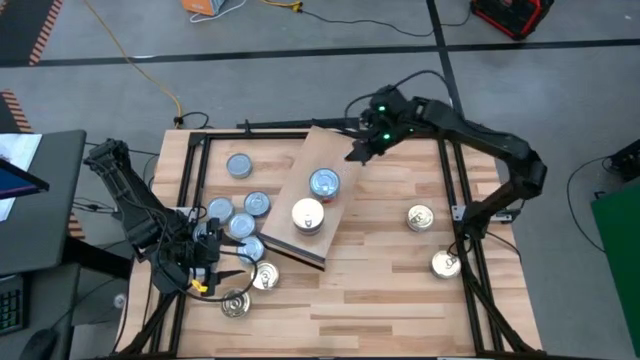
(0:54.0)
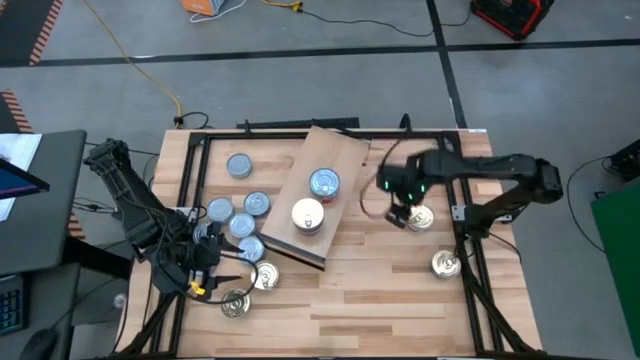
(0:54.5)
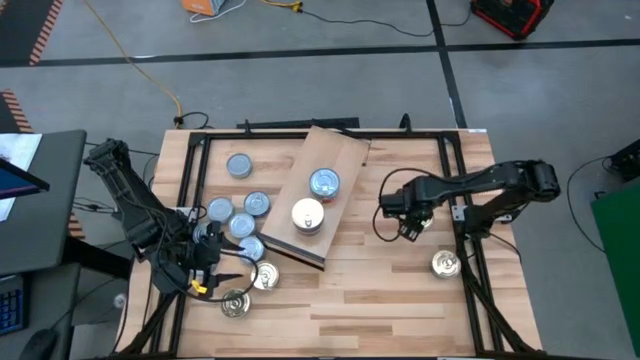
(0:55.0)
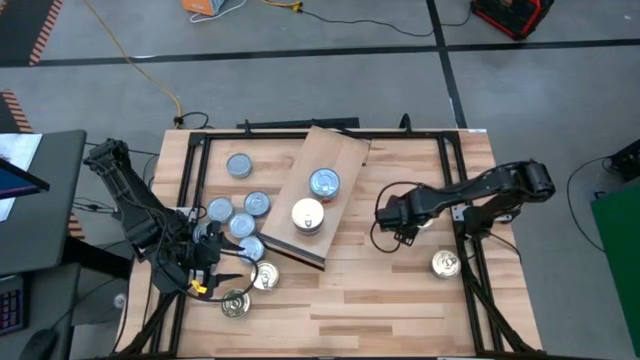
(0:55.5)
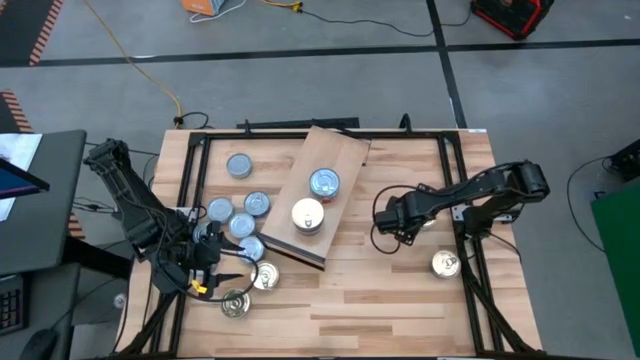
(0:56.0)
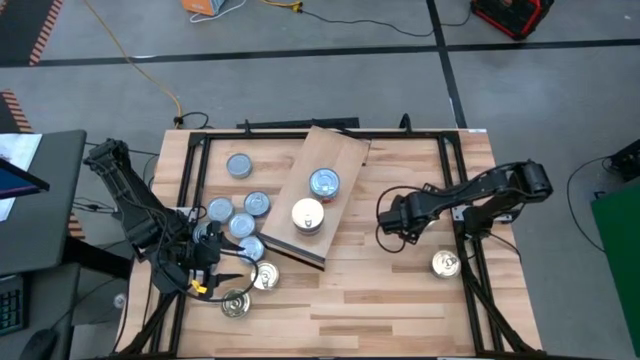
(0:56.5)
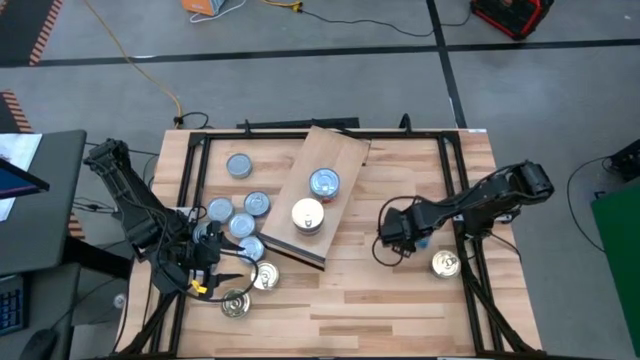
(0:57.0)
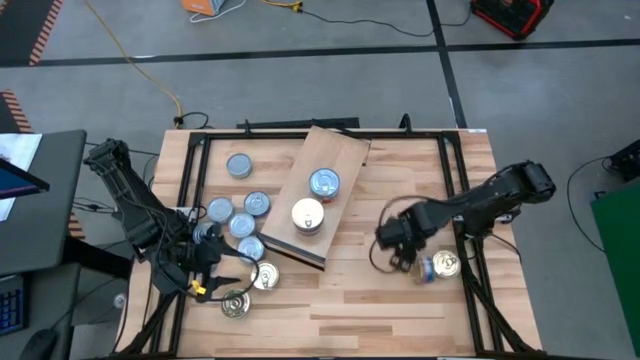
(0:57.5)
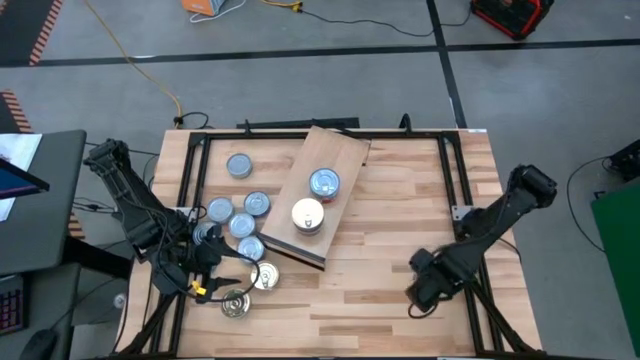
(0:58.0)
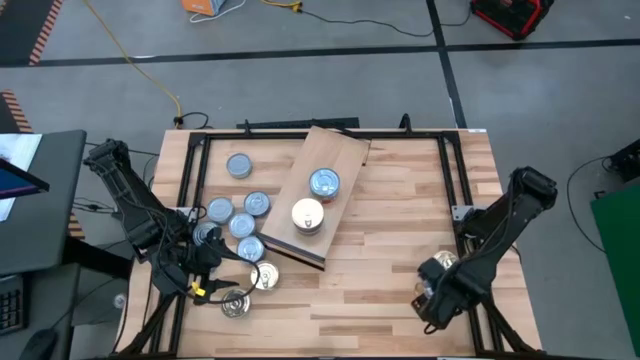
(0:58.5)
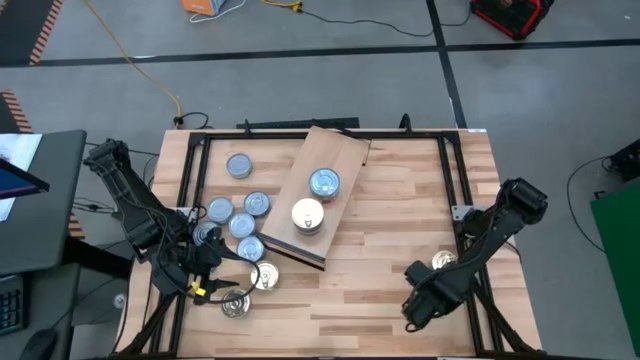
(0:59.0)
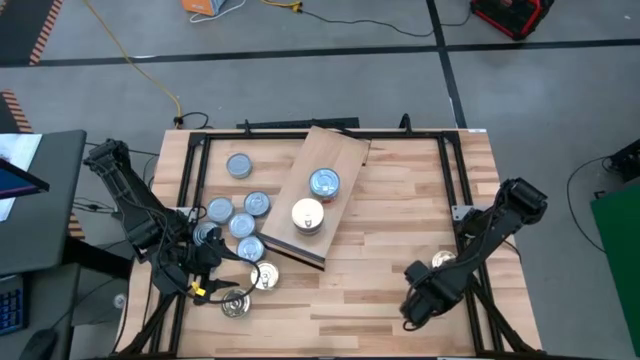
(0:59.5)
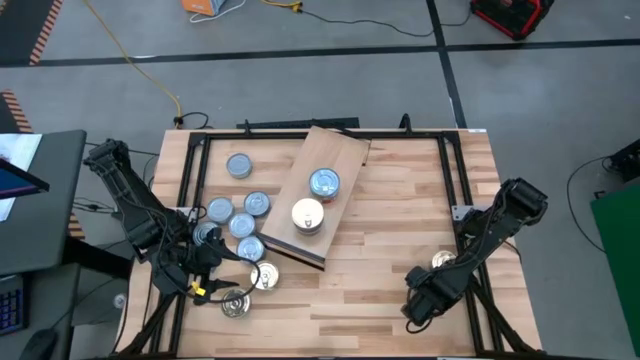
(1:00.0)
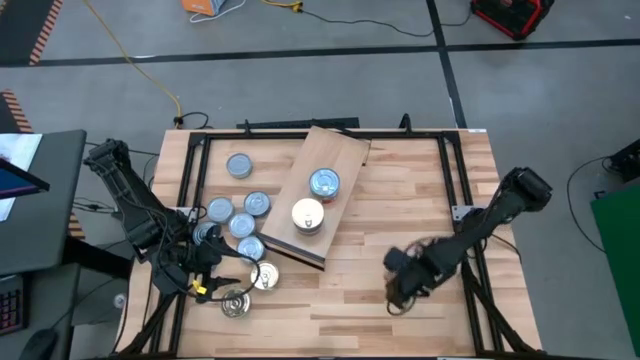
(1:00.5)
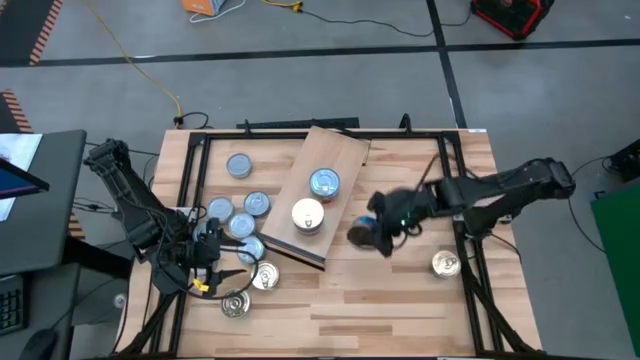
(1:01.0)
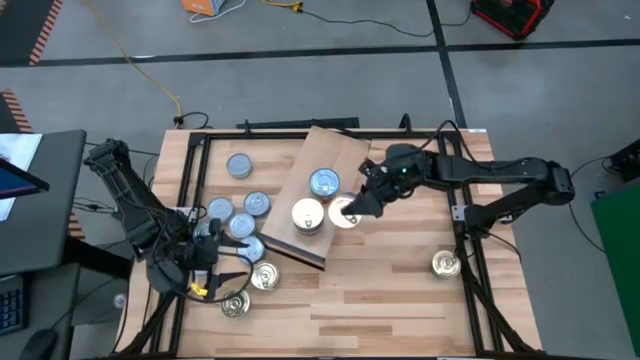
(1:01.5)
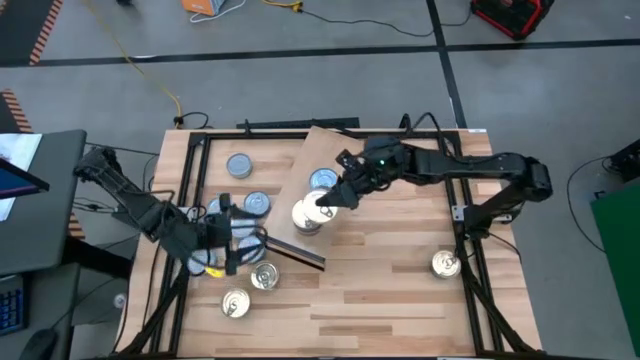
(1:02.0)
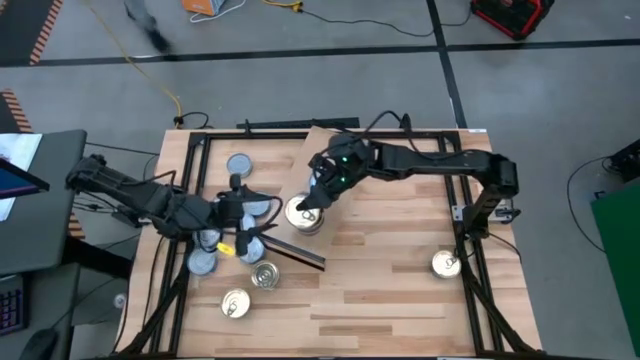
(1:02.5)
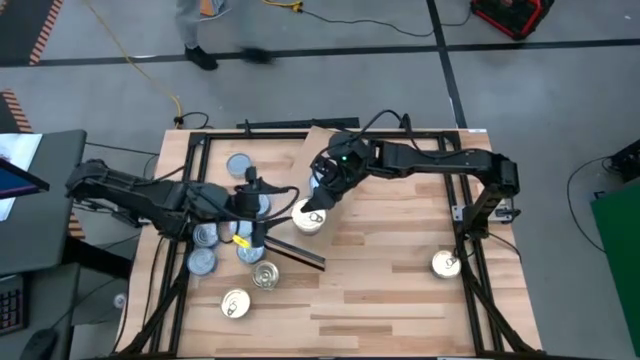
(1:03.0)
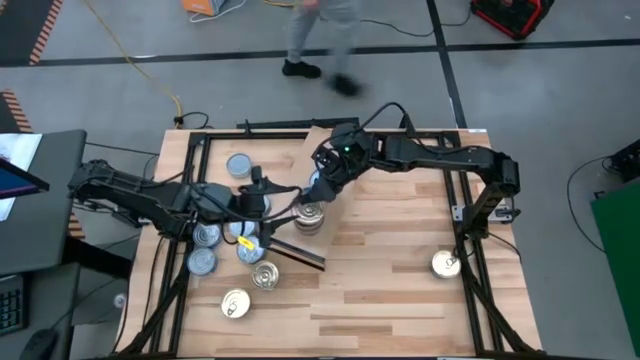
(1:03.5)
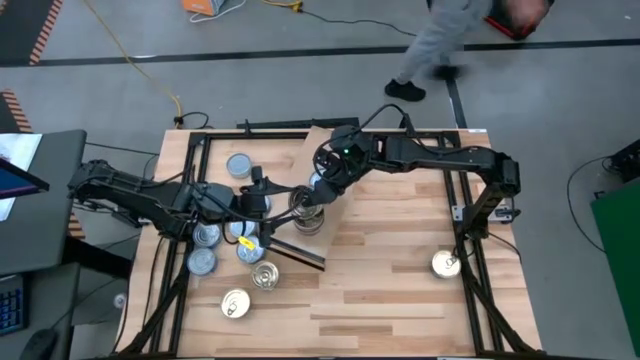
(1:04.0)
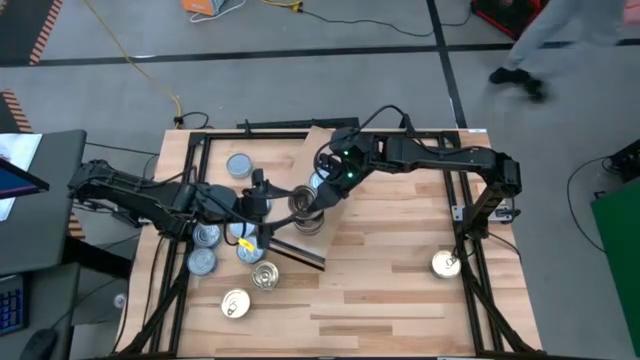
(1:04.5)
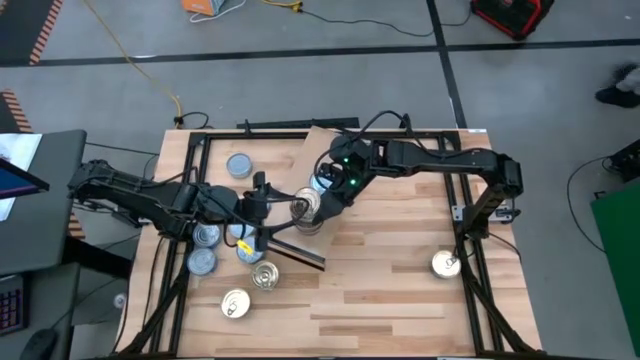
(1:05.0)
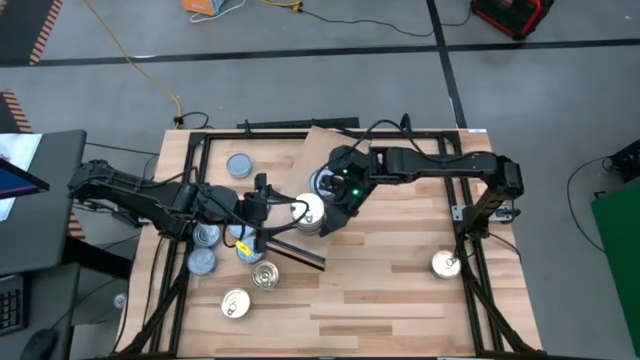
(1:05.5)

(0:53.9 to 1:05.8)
Task: Stack canned seafood by type on shelf
Stack the blue pink tuna can on top of the blue pink tuna can on the shelf

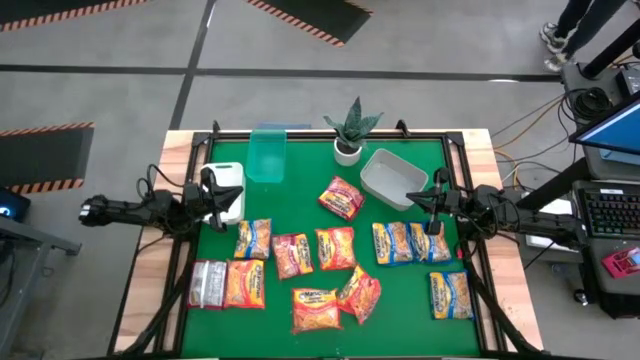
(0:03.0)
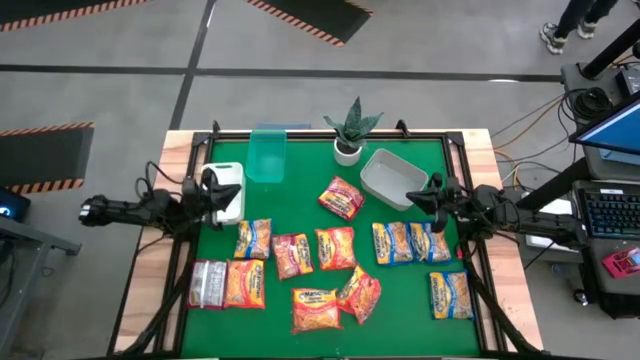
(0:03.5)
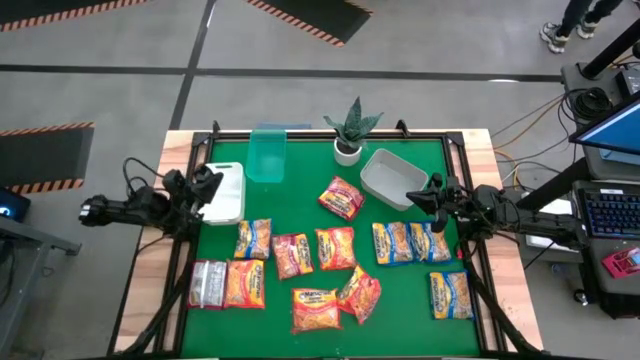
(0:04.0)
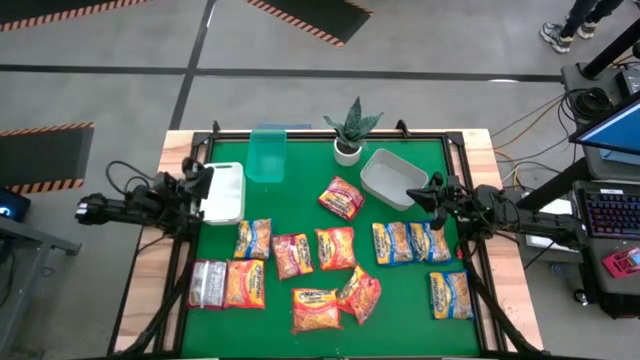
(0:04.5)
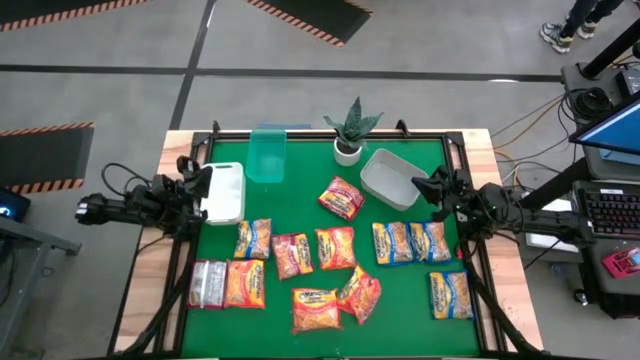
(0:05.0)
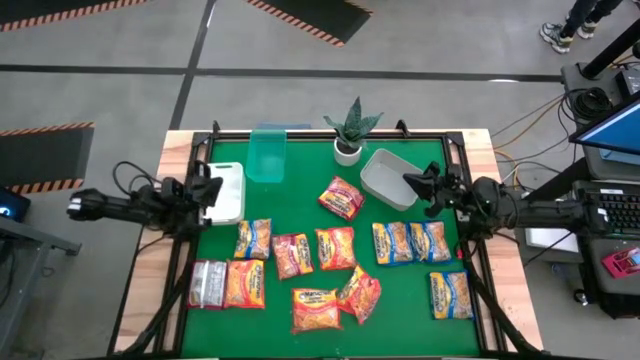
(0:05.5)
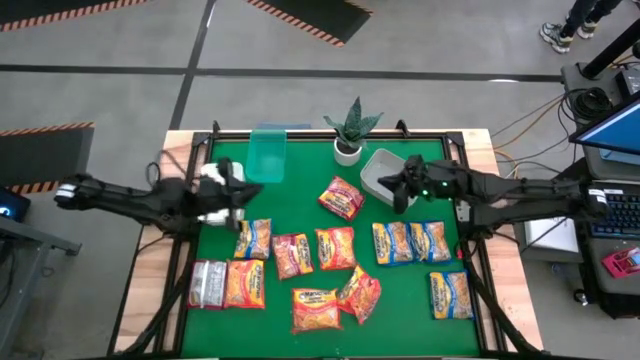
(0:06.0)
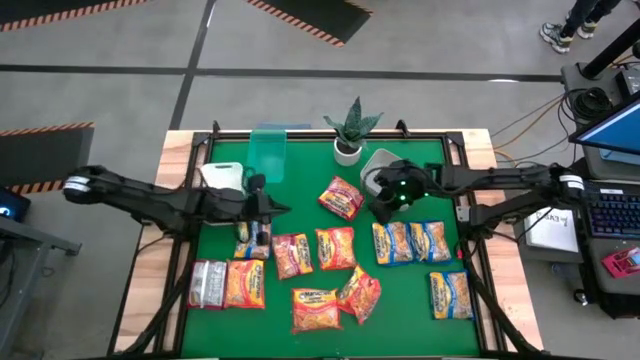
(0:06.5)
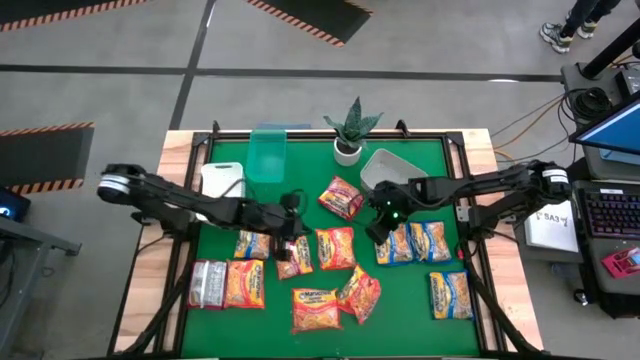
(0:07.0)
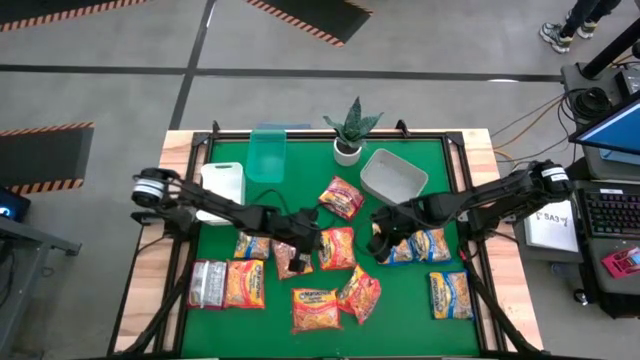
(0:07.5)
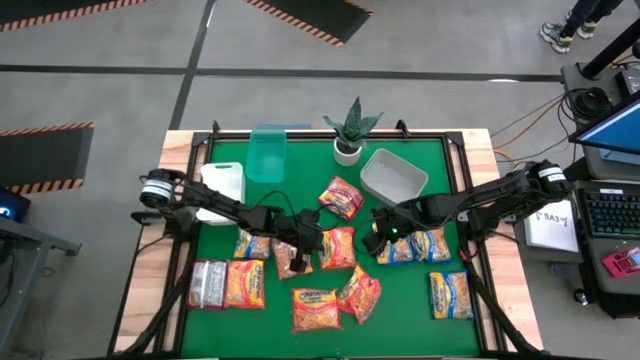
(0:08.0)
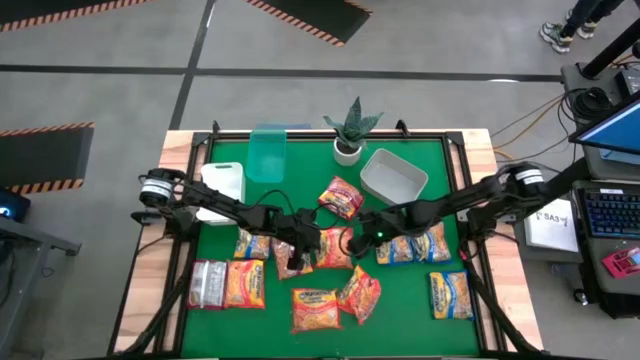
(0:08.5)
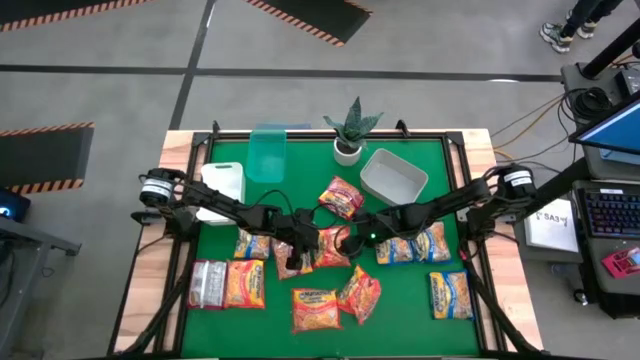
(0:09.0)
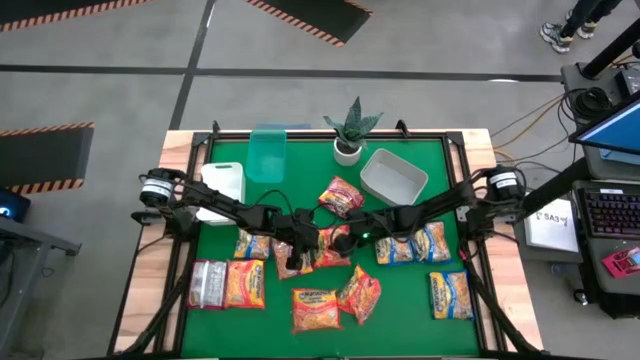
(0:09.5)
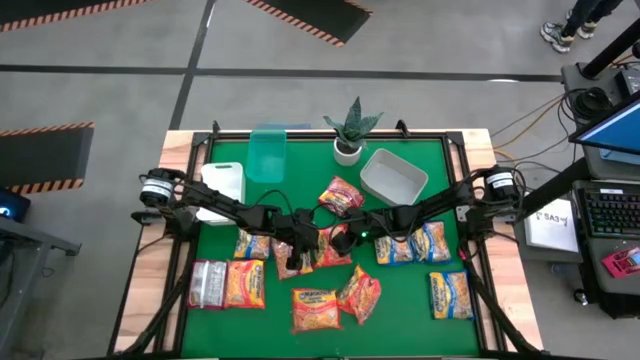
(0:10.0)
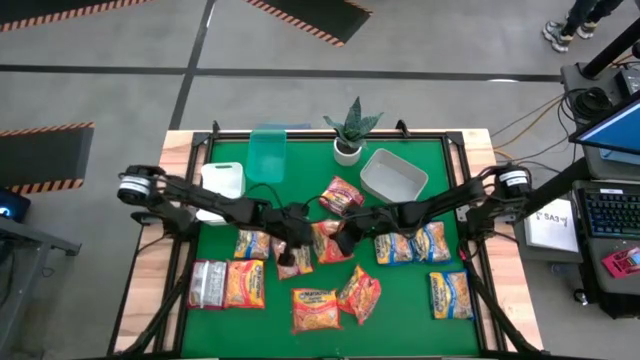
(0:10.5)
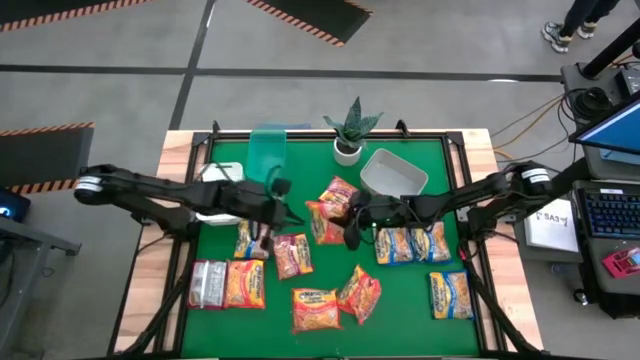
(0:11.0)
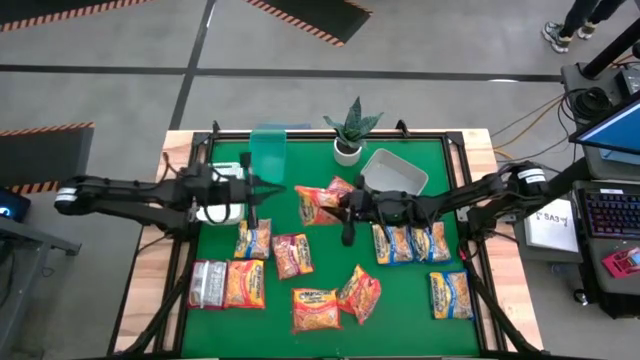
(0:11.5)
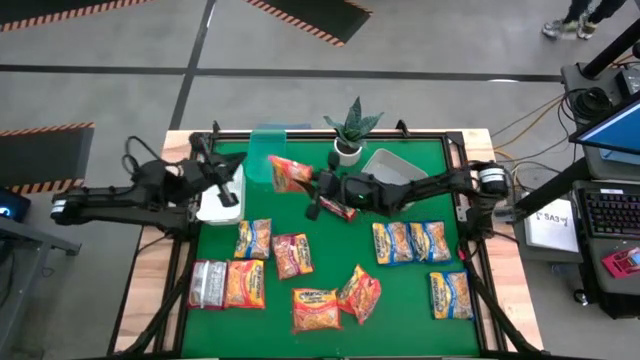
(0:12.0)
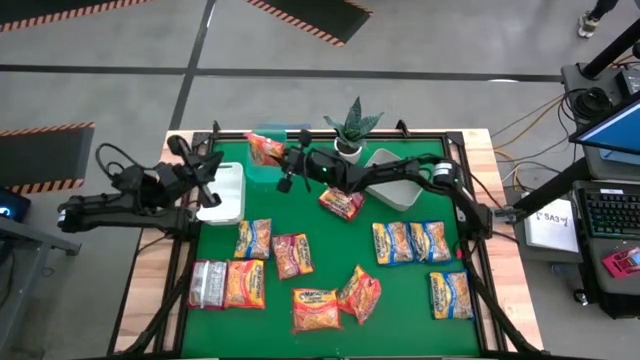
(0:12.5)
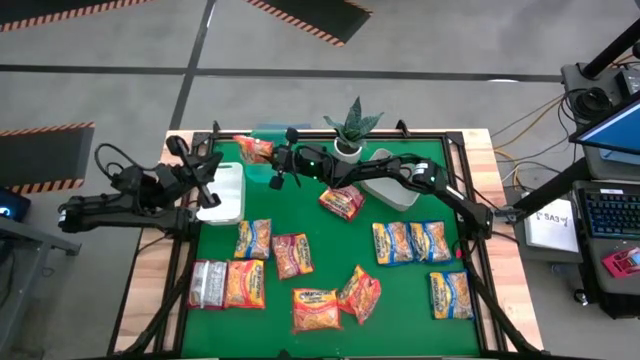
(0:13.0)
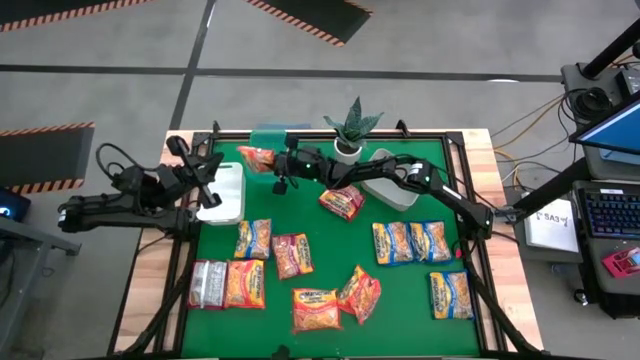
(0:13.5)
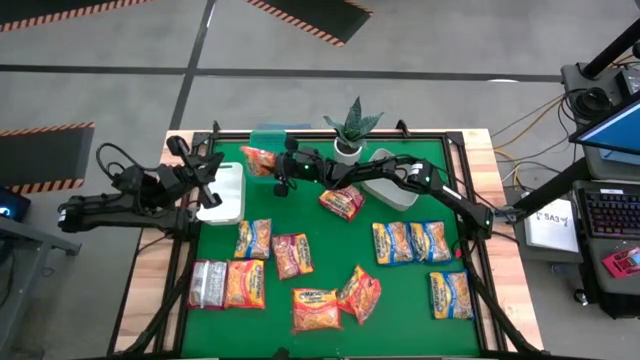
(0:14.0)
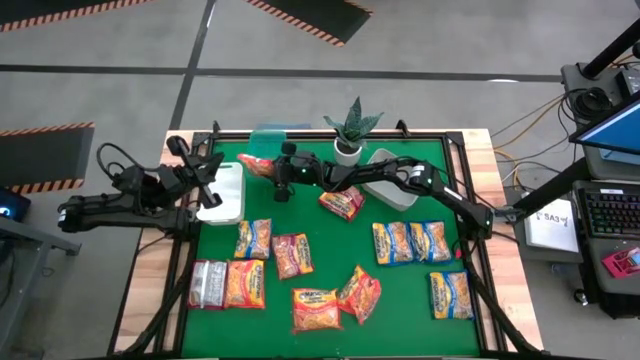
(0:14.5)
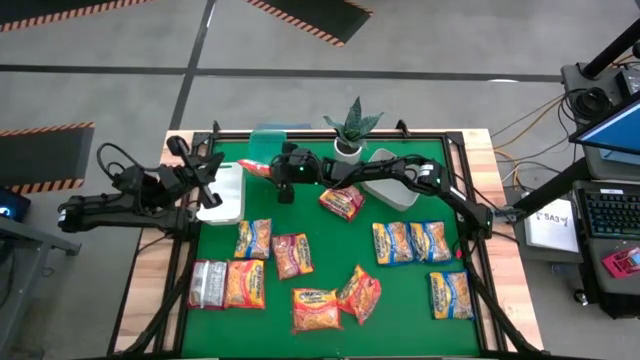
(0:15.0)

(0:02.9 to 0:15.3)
Task: Sort Maruchan noodles
Put the orange noodle pack into the green bin
